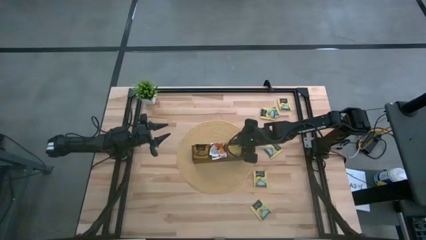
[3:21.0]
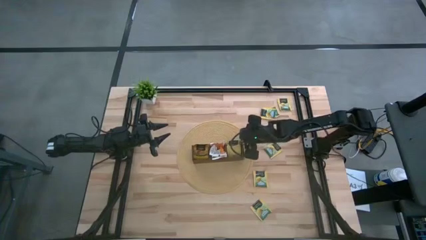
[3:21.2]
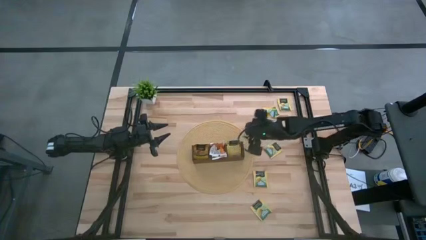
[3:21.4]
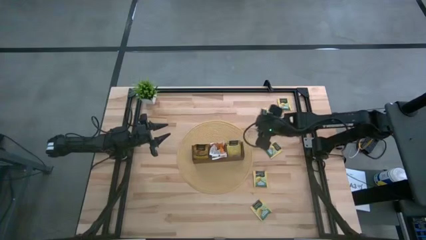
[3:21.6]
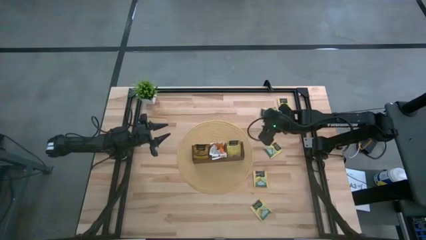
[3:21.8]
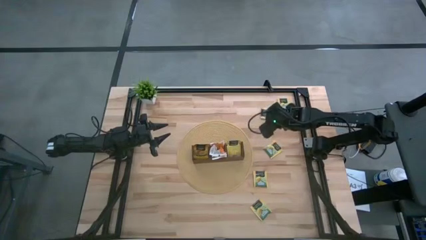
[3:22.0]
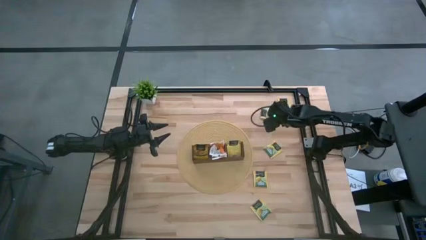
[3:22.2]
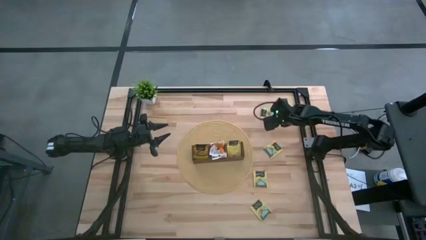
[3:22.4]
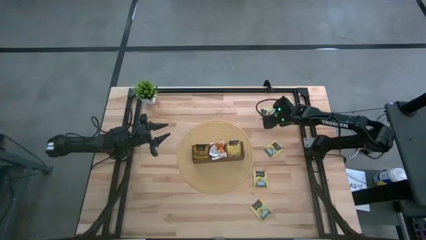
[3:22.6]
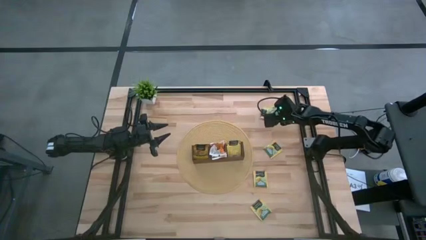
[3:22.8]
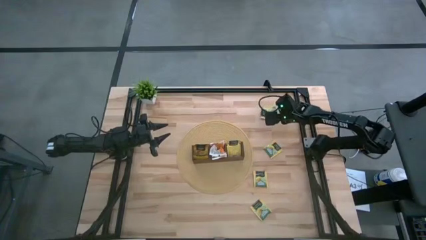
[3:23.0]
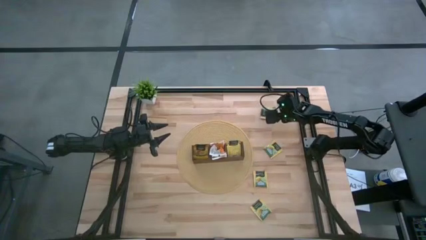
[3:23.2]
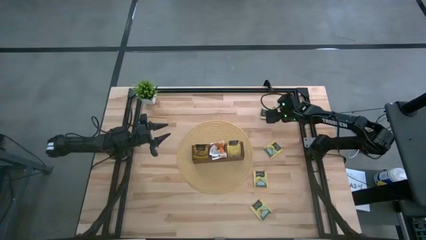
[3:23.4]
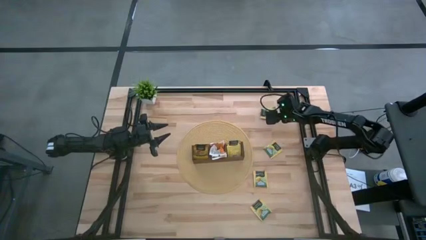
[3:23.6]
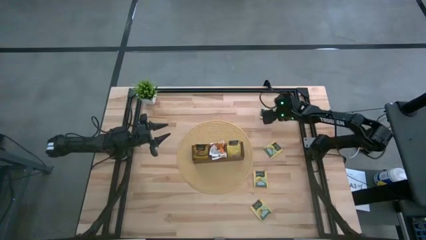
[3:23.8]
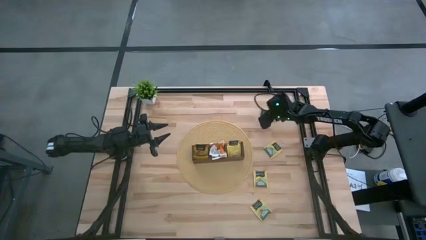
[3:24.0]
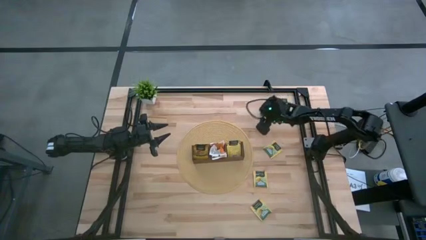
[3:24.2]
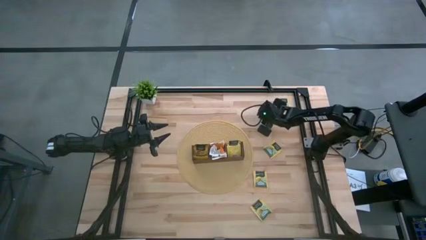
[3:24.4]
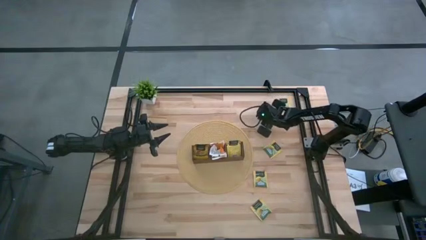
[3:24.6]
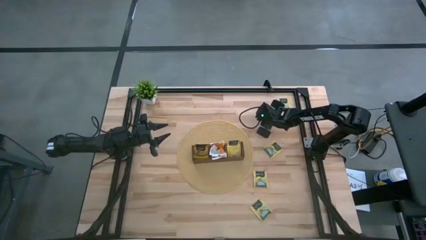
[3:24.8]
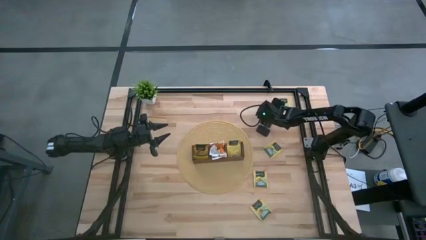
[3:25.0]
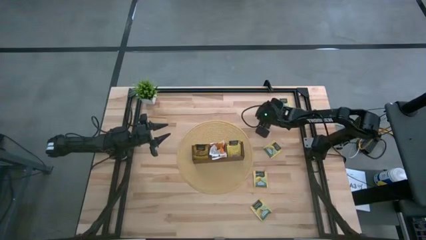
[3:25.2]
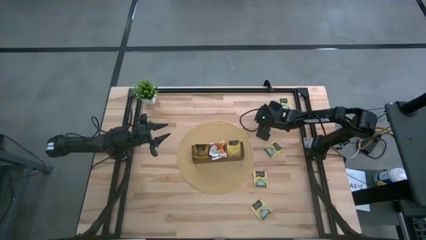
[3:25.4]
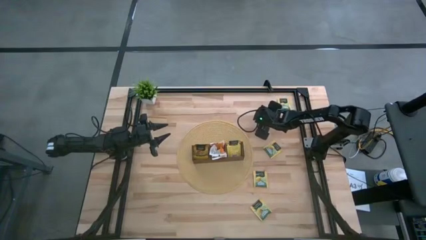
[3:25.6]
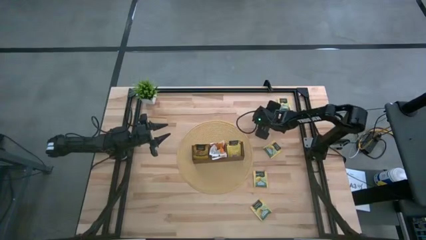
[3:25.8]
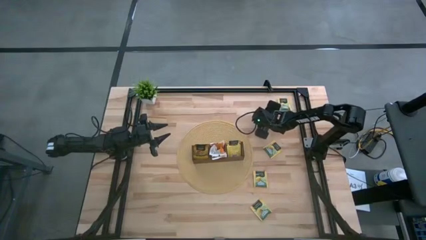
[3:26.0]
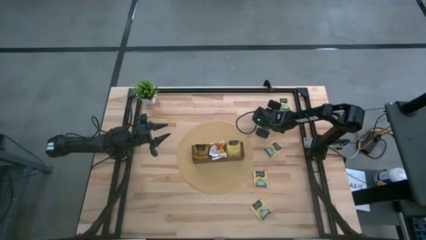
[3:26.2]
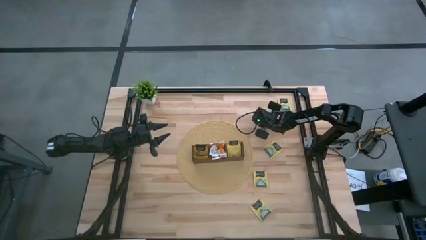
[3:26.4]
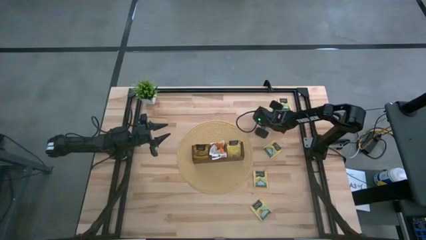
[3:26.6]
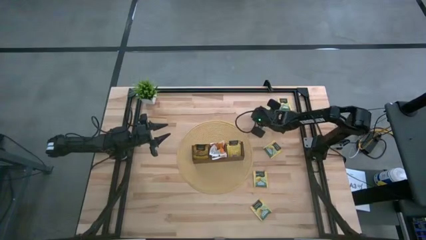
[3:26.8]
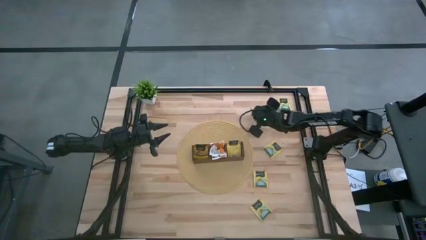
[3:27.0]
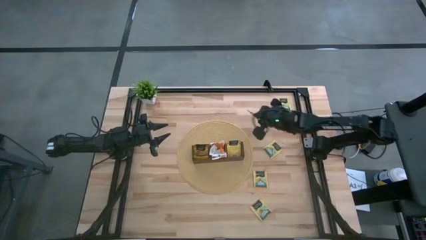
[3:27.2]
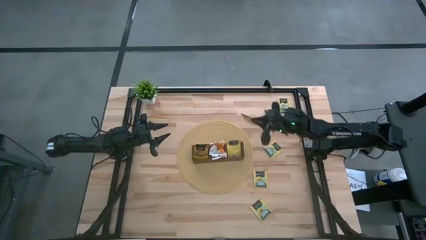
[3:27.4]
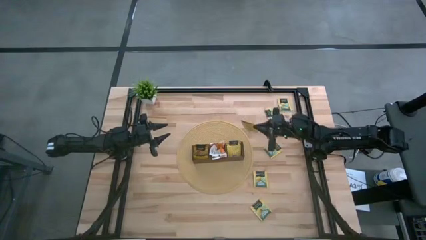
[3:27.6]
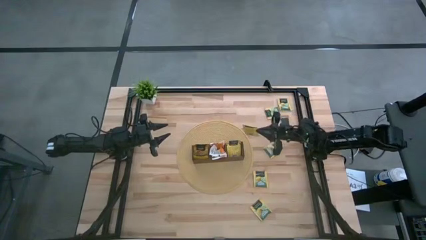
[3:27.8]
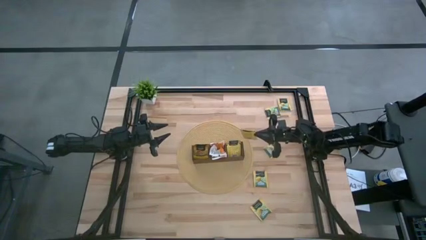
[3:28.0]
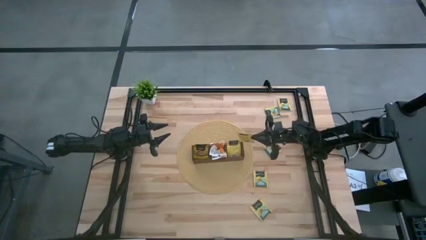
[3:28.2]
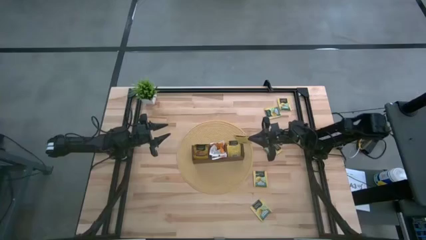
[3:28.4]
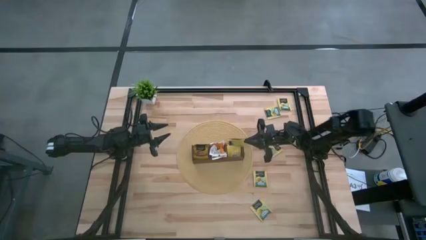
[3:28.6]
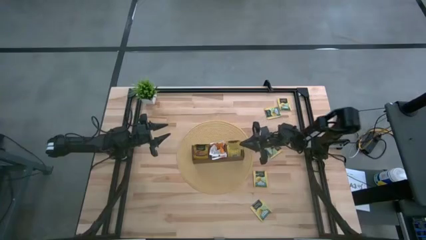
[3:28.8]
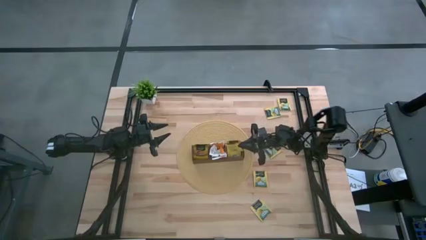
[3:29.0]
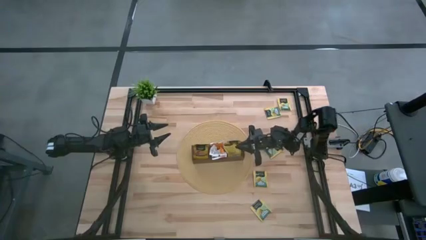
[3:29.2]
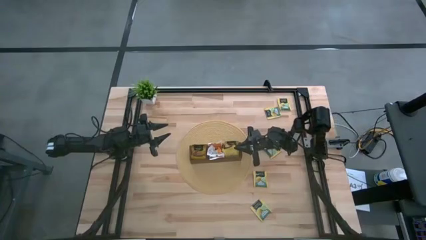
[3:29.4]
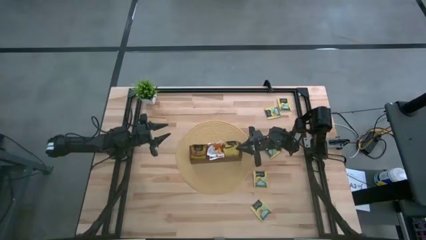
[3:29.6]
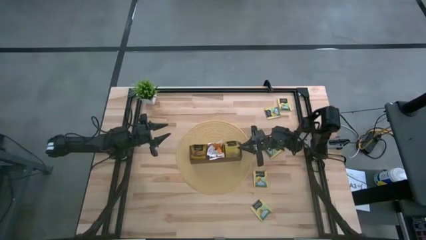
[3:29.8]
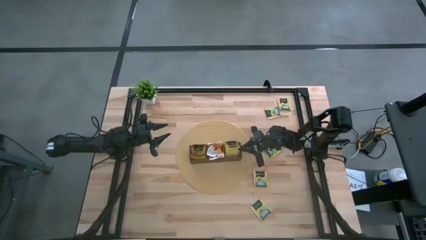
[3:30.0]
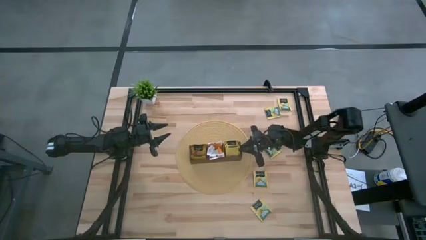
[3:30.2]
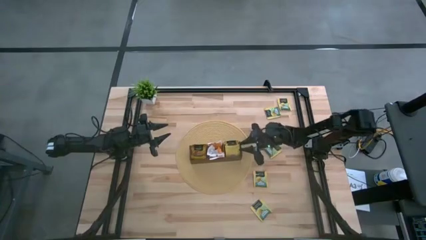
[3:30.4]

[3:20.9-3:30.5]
Task: Pick & Place Tea
Put the lemon tea sachet into the right section of the wooden organizer

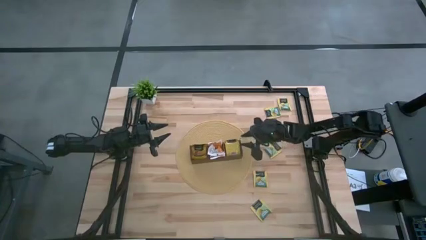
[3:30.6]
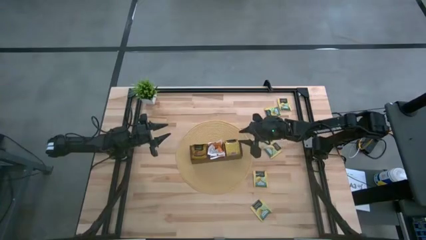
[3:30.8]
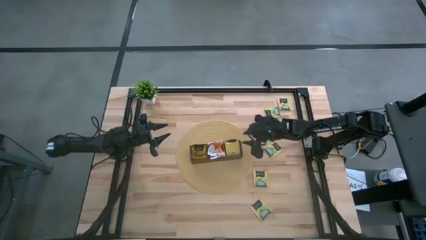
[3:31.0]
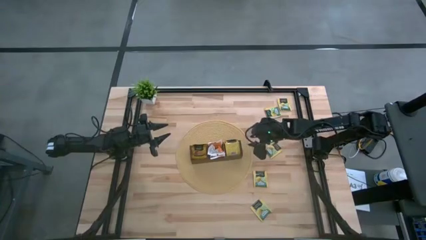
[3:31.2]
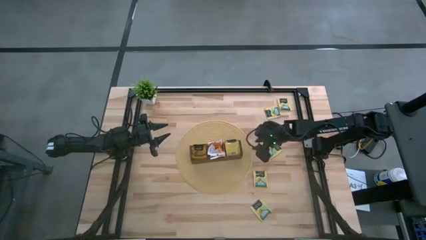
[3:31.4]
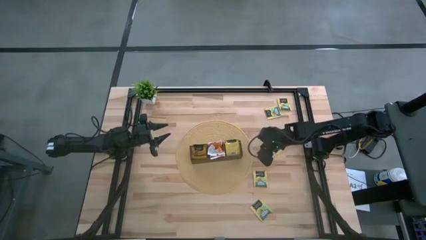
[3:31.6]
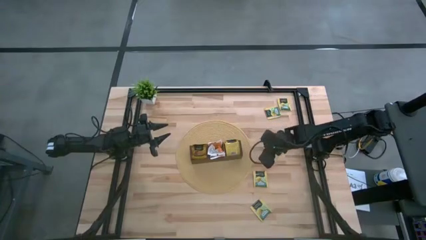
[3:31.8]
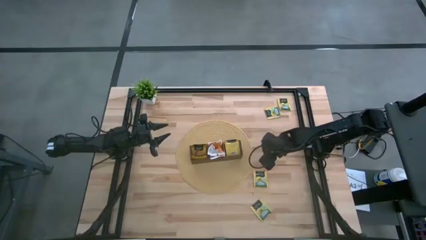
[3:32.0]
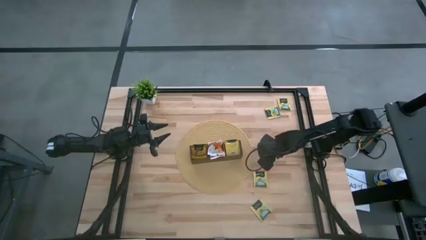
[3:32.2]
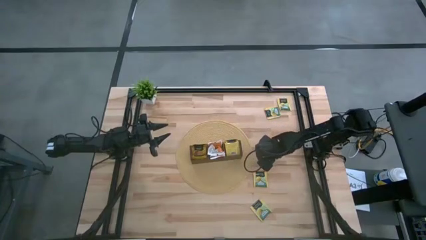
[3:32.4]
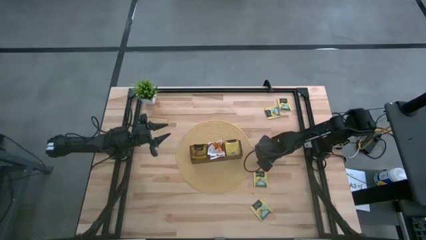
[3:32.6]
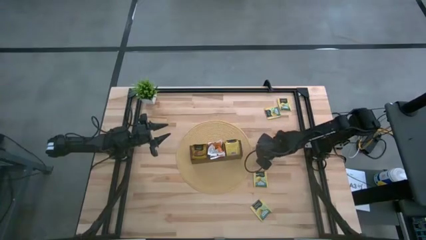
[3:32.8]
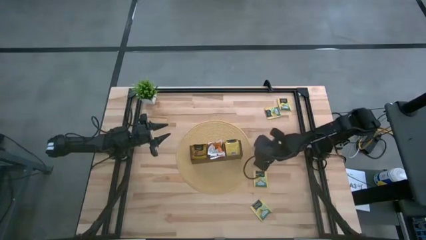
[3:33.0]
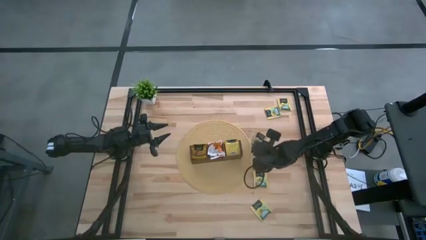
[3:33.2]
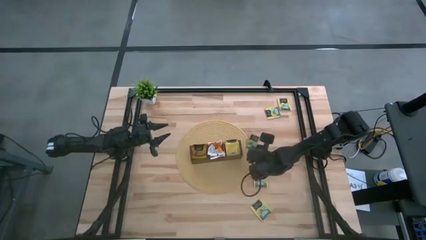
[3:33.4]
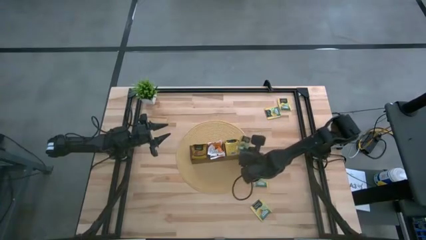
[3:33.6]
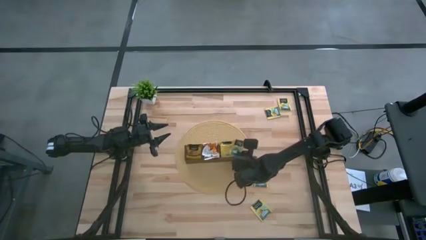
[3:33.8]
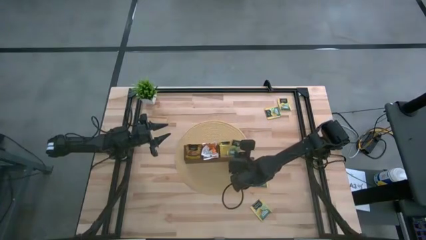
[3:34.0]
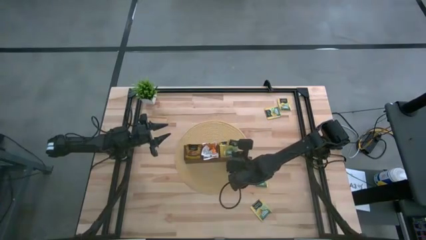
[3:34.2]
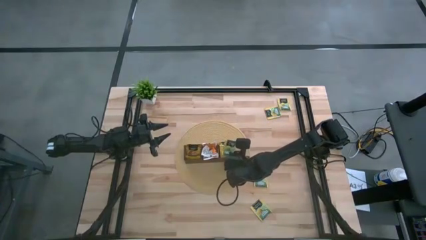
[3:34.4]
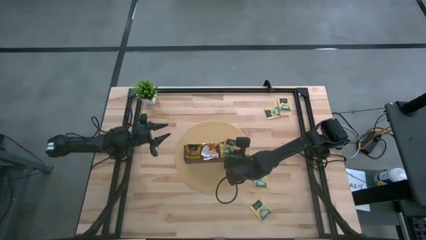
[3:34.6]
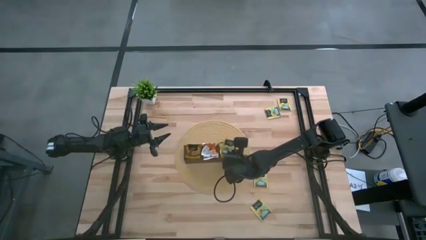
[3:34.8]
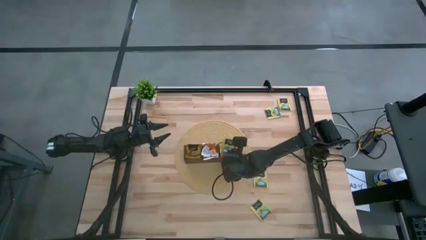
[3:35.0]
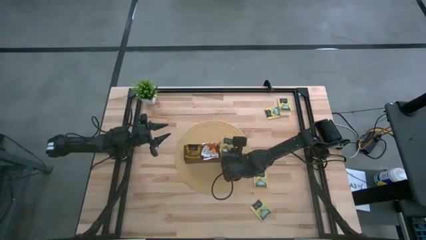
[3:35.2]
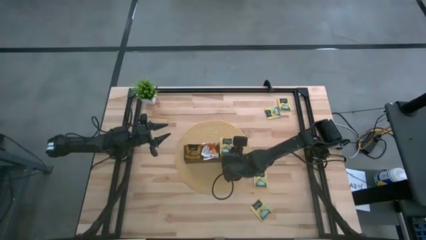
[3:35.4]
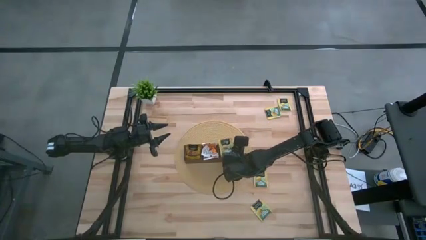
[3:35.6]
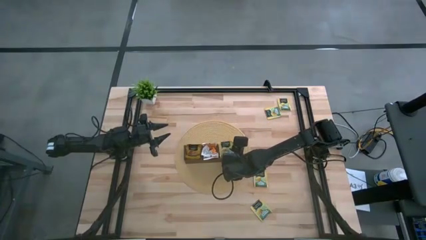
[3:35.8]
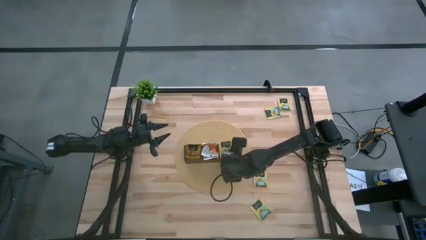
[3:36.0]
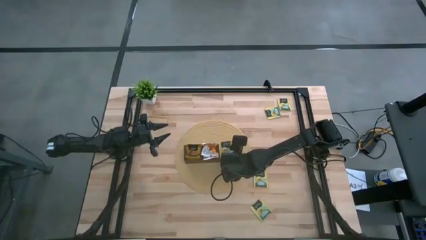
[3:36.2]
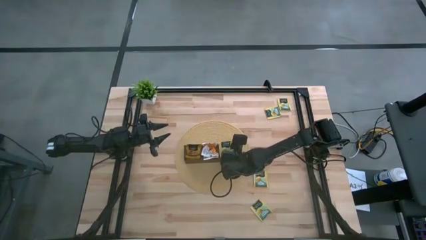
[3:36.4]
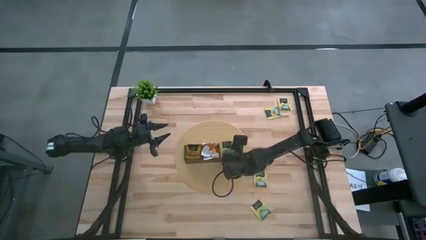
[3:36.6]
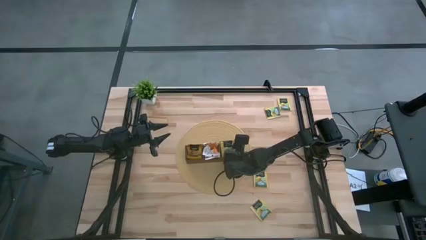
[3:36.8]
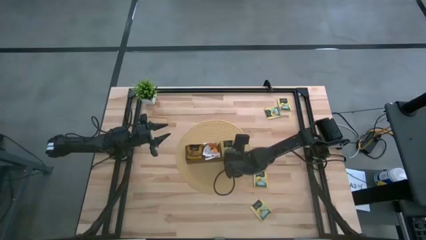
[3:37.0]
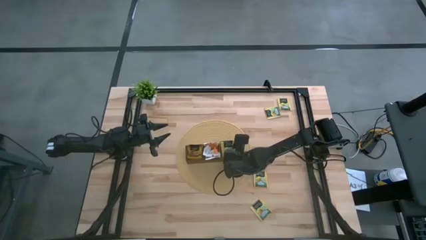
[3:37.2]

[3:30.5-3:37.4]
Put the lemon tea sachet into the right section of the wooden organizer
